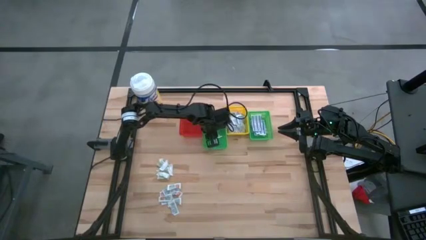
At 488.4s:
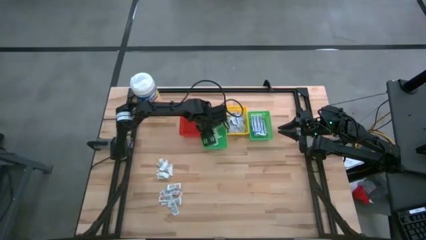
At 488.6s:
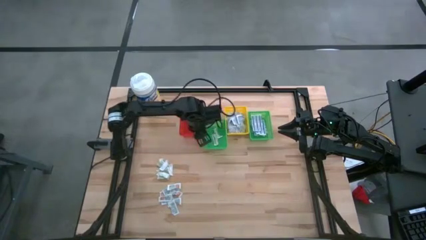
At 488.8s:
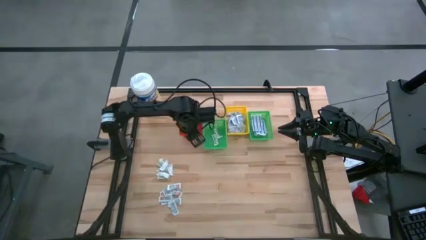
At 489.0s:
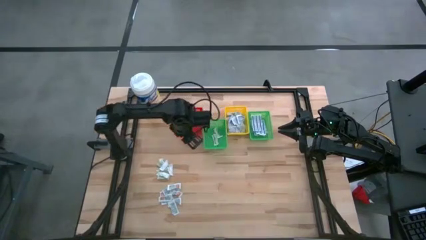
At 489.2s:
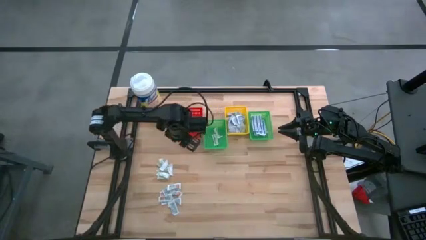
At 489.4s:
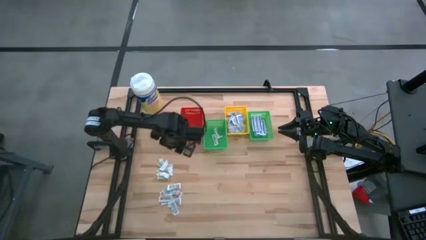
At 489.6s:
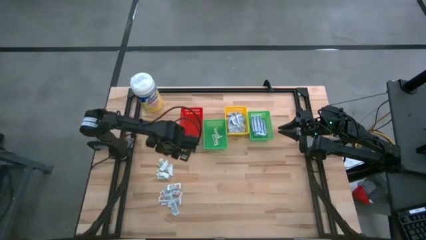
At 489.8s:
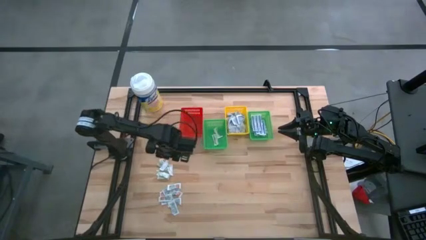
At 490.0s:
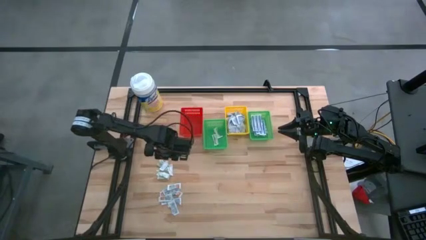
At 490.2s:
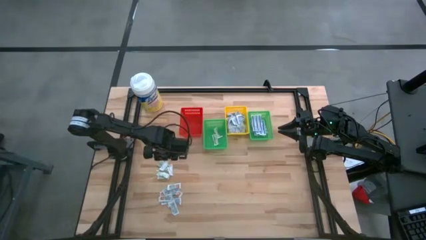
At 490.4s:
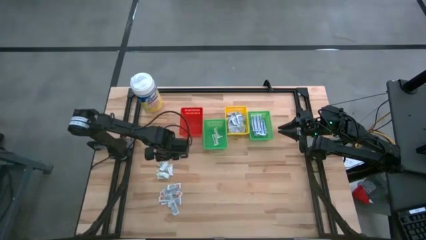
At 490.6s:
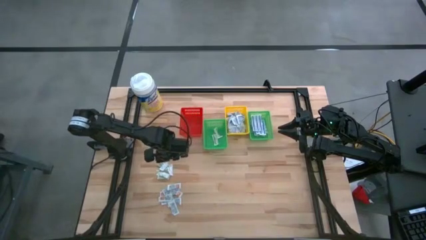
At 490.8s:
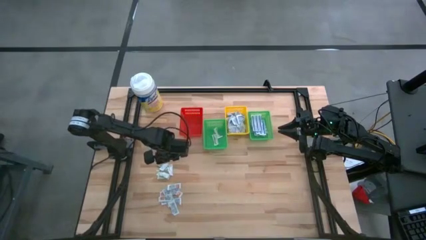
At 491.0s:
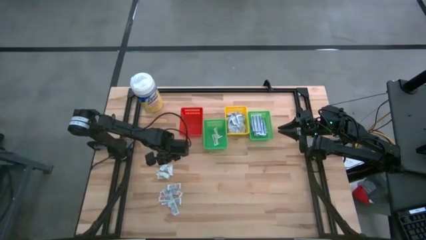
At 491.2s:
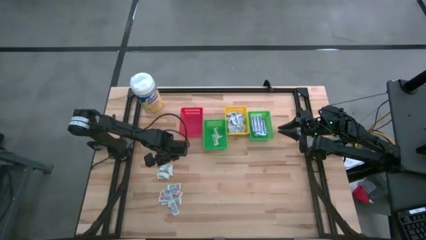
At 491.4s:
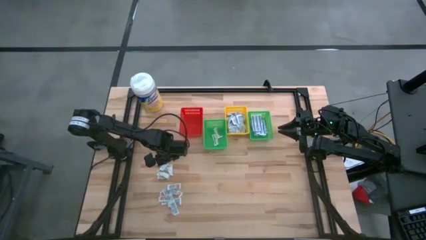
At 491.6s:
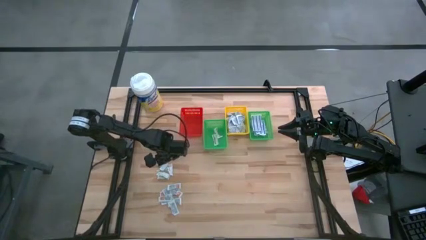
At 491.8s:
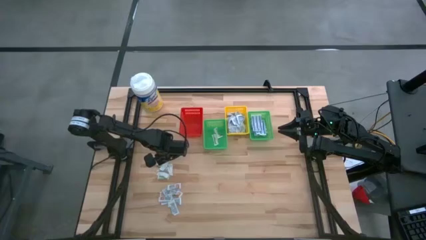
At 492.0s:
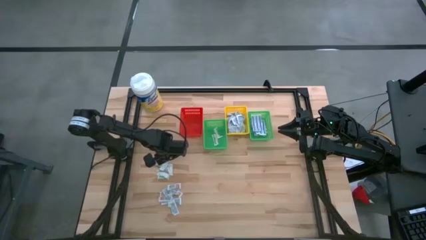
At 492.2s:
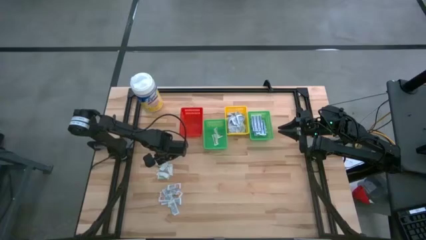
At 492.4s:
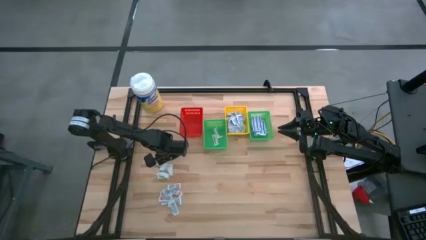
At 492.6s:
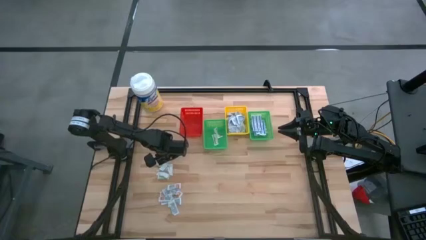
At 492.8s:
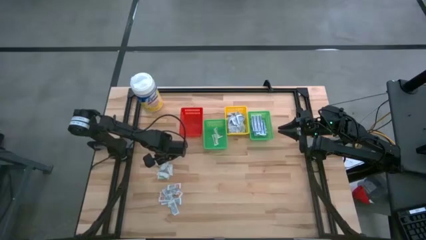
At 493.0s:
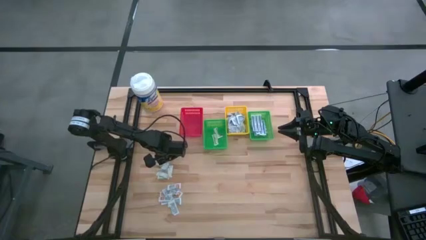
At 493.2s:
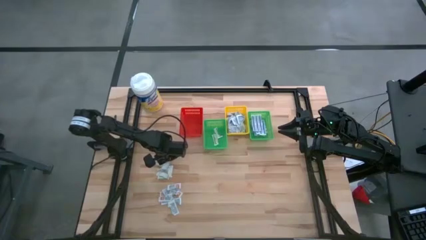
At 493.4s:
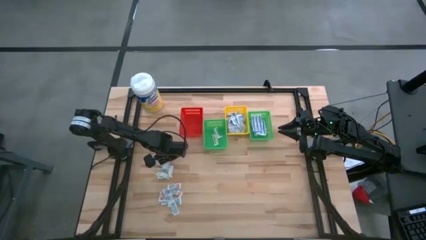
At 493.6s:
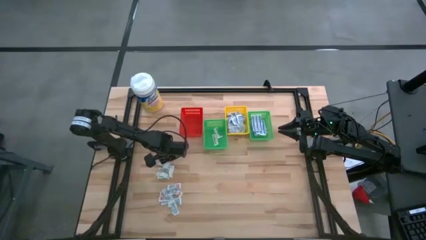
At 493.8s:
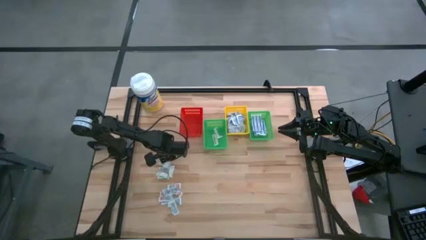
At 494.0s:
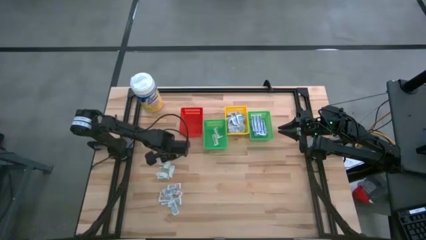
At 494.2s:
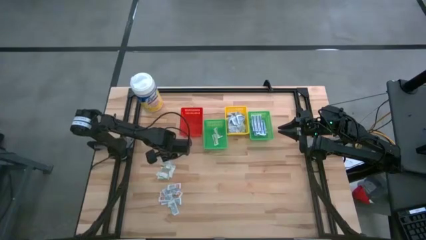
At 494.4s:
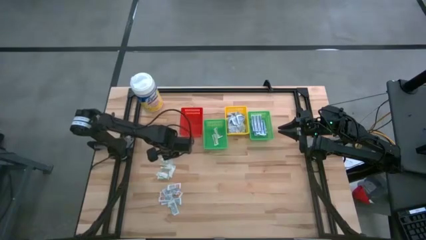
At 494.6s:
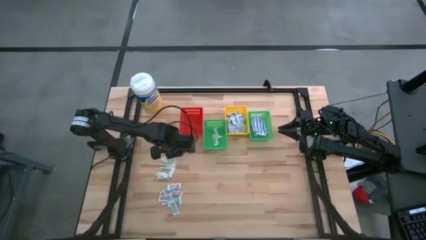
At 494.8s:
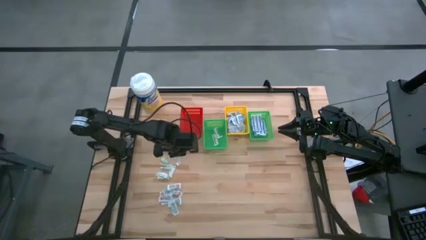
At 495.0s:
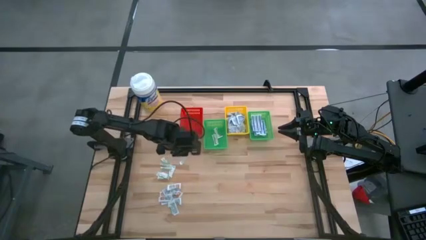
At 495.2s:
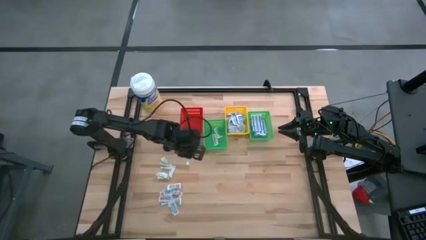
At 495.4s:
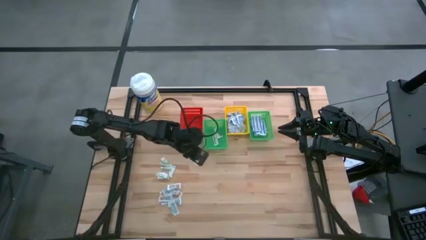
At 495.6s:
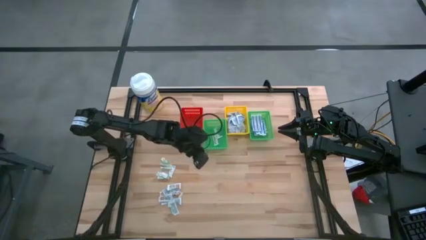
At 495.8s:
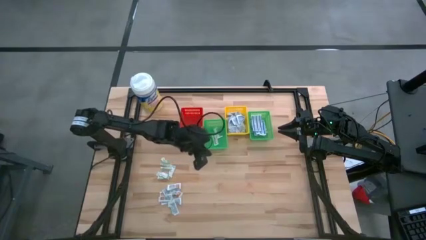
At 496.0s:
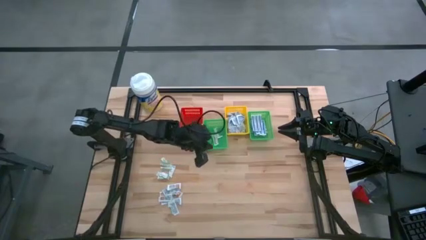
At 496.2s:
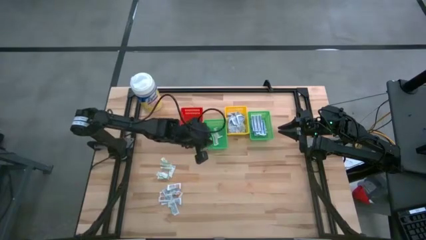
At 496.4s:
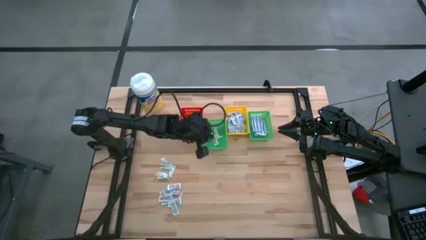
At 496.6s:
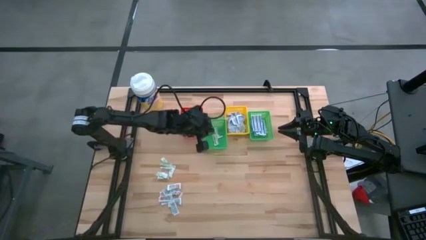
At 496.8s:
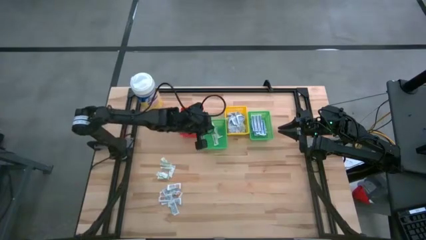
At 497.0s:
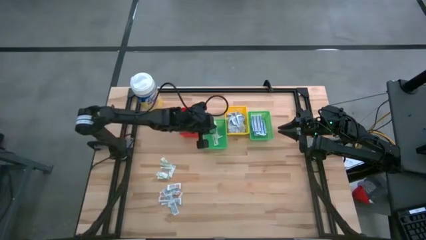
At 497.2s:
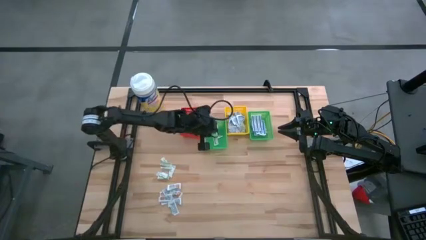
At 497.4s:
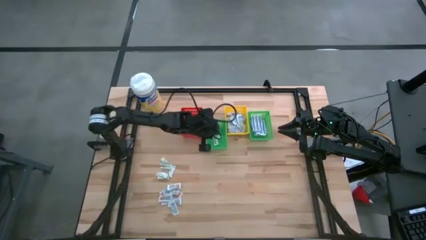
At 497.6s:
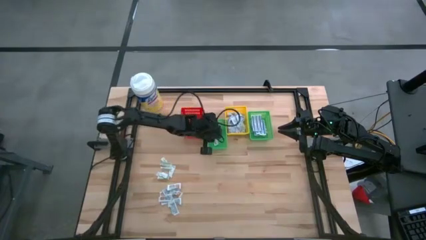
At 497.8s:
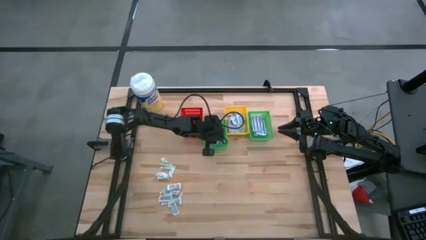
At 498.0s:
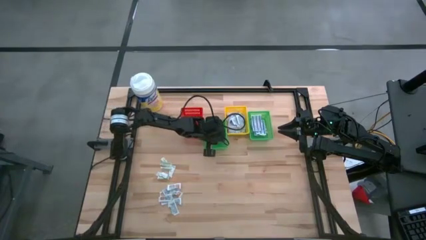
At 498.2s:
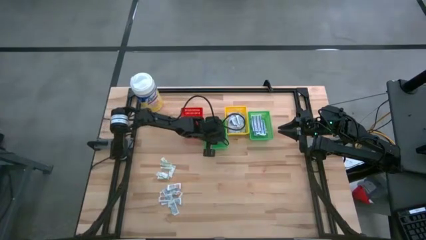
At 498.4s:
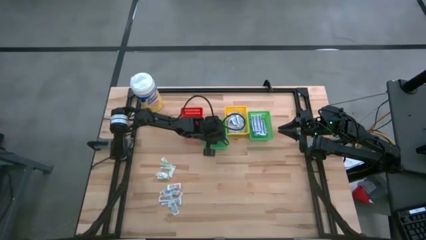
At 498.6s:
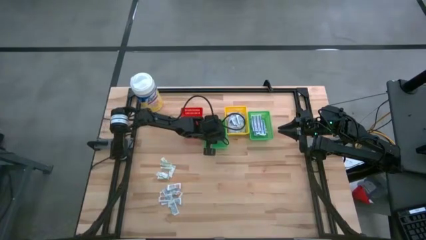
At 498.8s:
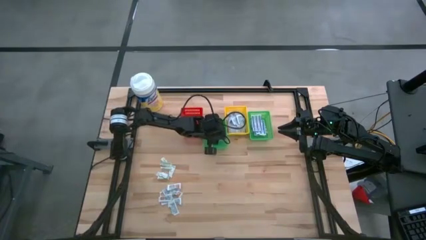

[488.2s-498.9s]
Task: Pick & Place First Aid Supplies
Put the bandage into the left green basket

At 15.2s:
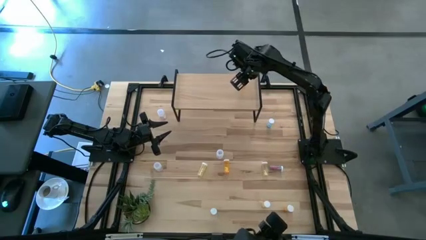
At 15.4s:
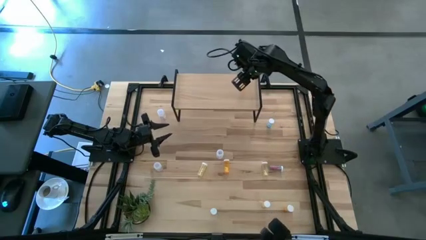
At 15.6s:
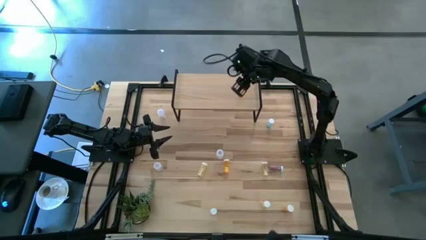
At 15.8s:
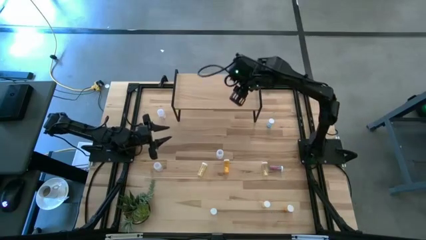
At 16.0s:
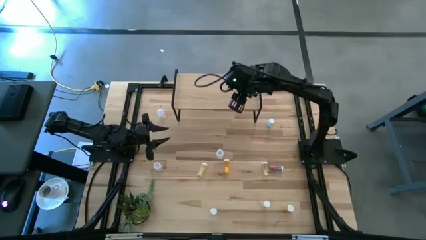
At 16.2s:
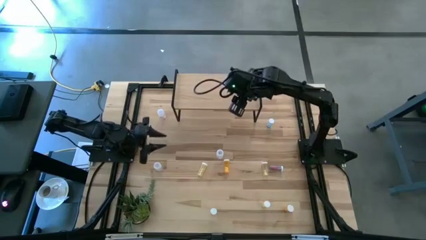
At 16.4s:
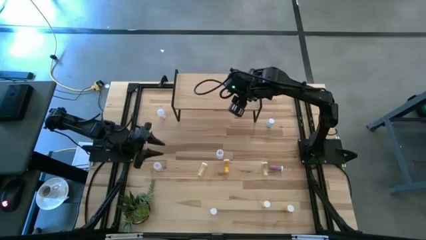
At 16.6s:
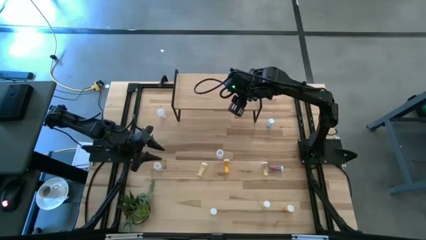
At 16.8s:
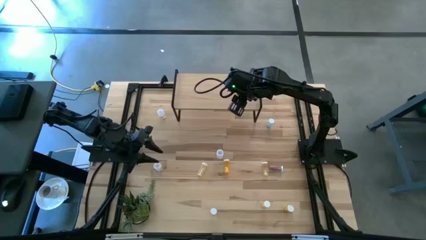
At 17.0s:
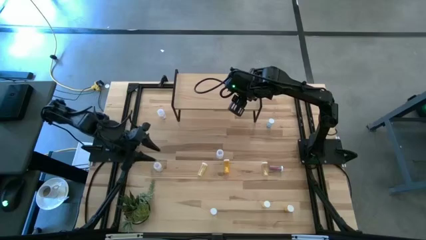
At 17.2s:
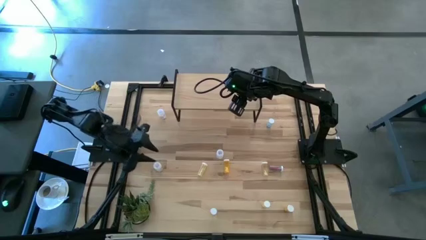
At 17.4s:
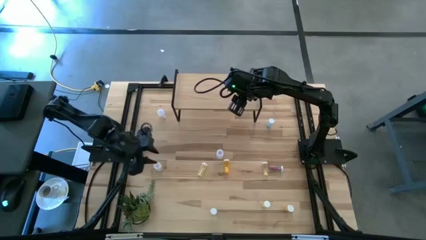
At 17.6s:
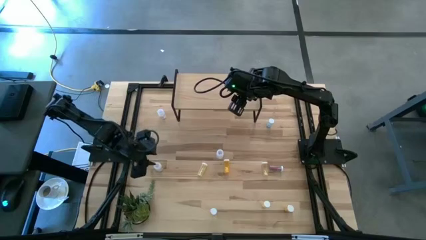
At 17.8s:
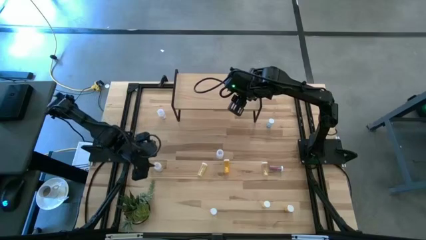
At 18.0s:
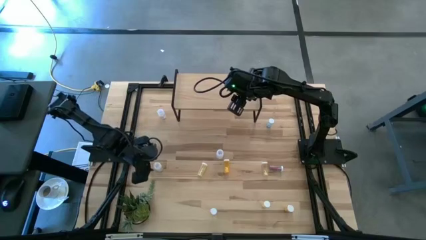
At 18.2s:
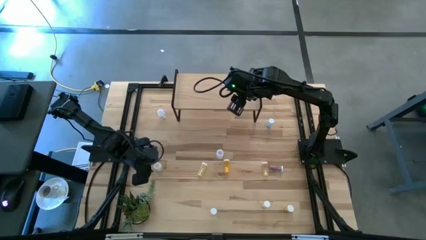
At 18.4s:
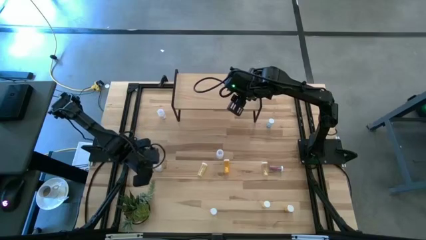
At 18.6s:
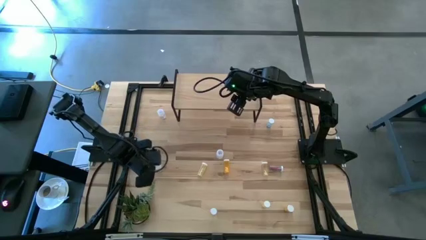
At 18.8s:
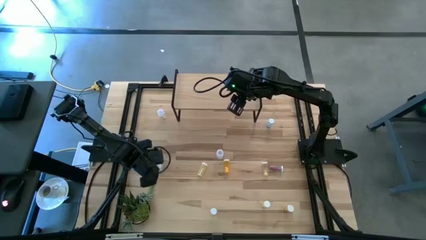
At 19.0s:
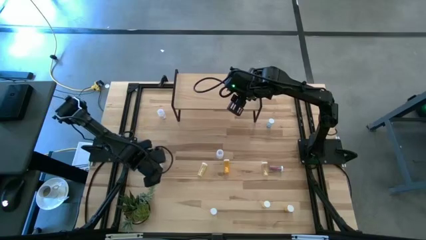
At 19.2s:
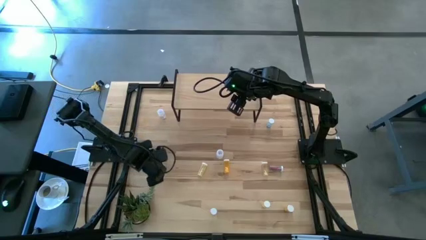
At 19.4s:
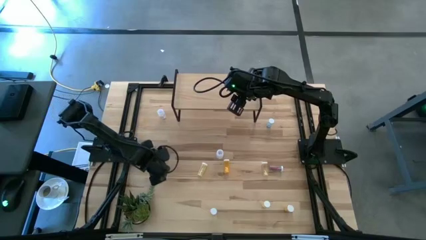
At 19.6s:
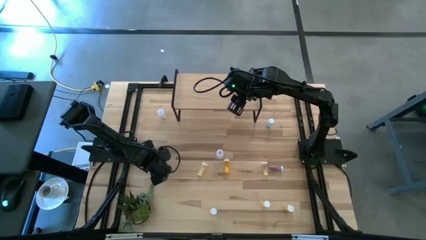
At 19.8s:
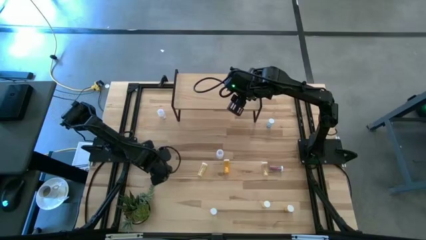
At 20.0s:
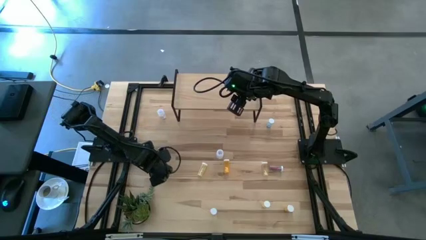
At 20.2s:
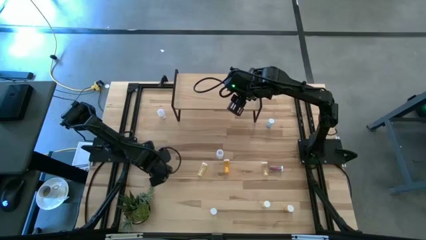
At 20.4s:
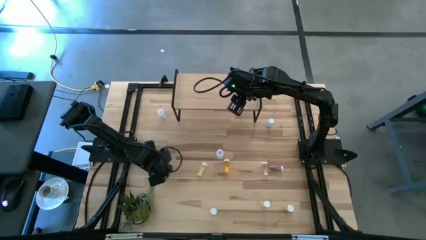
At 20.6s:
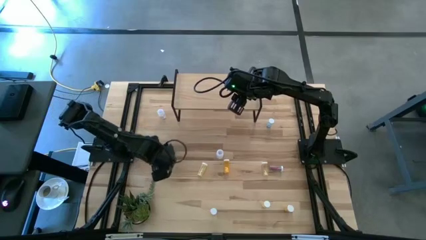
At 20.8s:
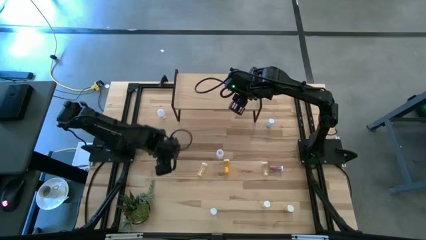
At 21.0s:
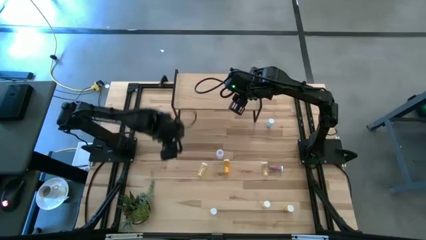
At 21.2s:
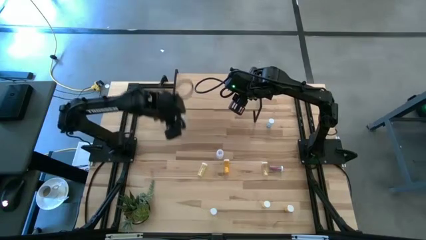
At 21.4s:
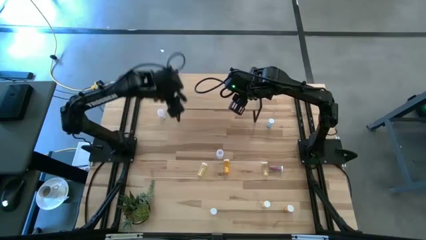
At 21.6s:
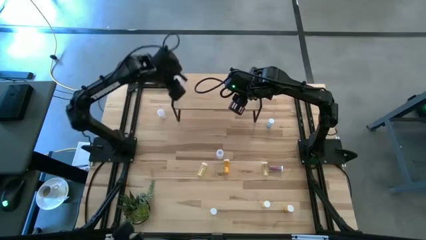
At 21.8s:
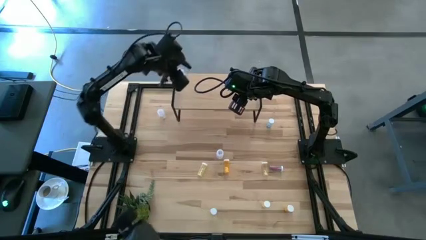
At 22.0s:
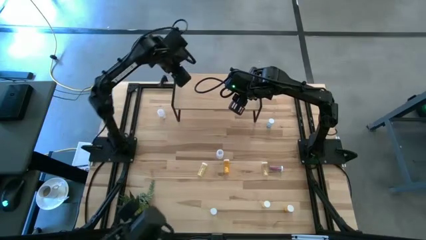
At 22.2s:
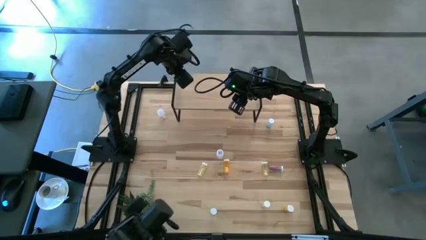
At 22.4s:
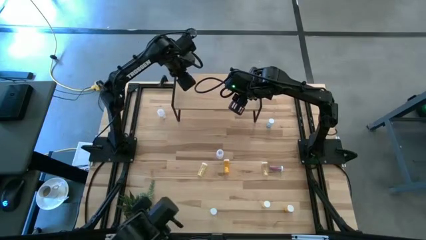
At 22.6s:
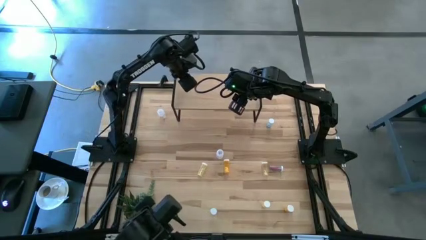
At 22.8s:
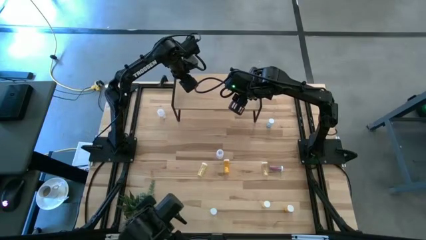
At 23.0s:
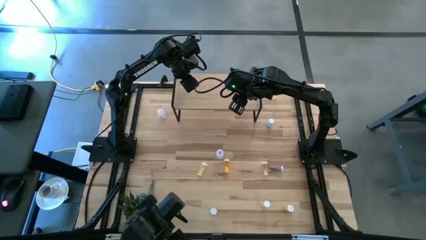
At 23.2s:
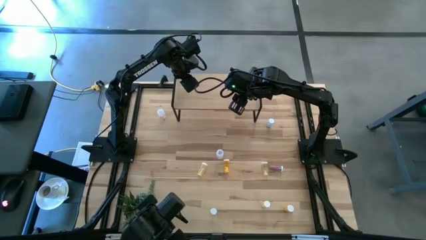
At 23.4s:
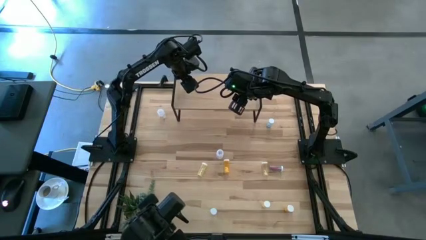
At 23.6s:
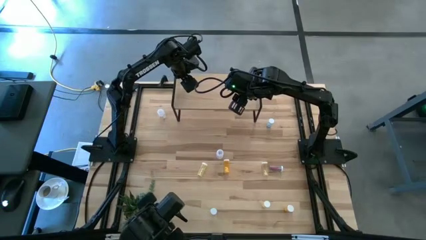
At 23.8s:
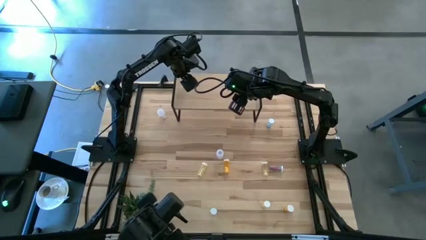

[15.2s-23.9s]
Task: Pick and place medicine bottles onto shelf by color
Put the bottom left transparent pill bottle on the shelf
